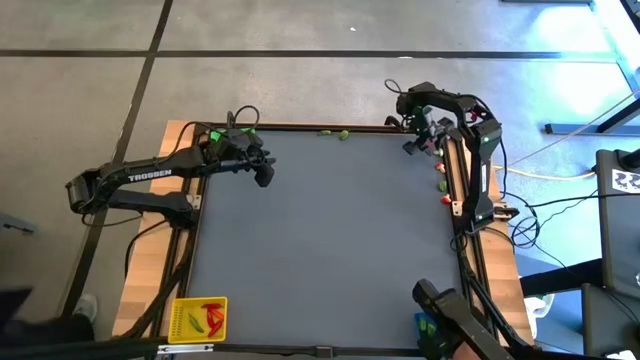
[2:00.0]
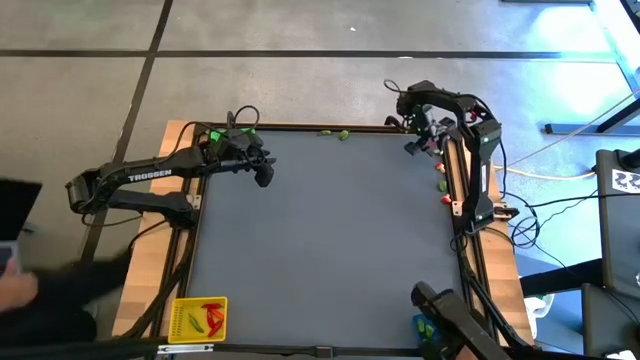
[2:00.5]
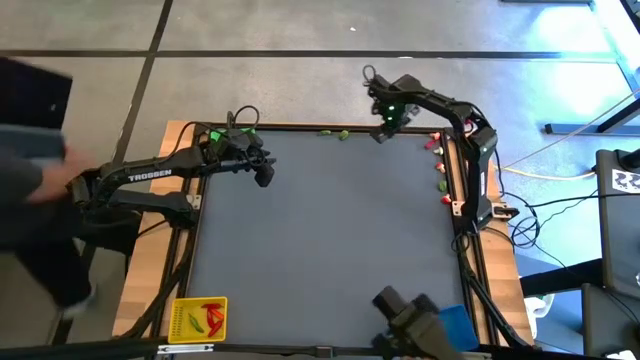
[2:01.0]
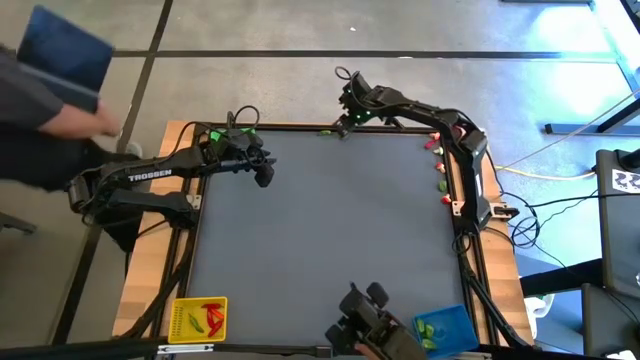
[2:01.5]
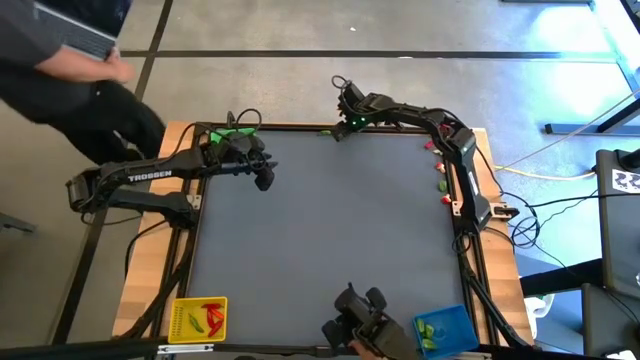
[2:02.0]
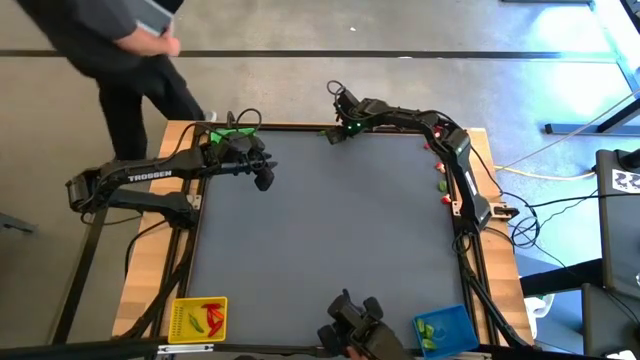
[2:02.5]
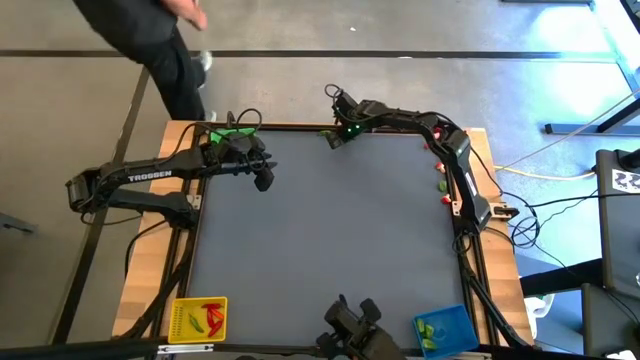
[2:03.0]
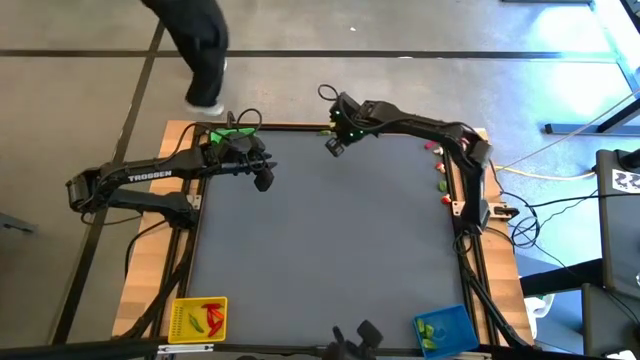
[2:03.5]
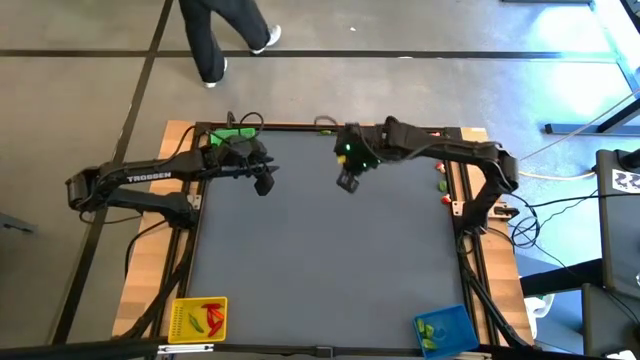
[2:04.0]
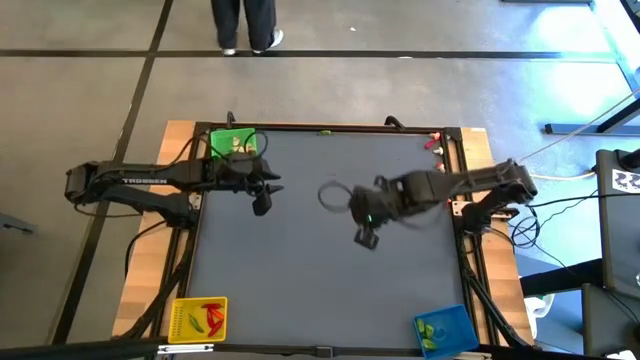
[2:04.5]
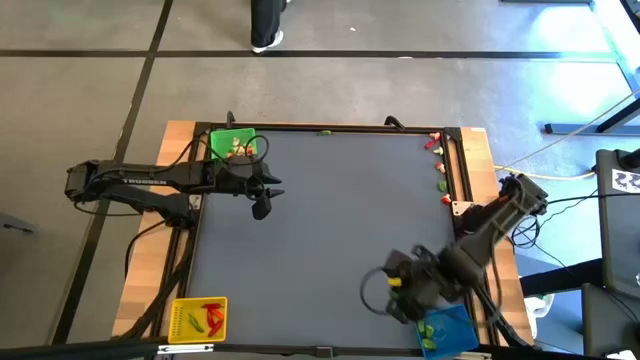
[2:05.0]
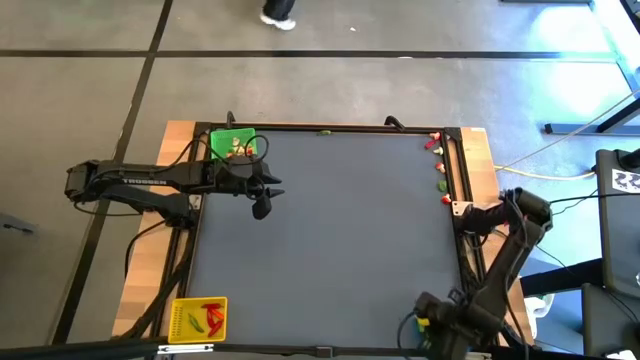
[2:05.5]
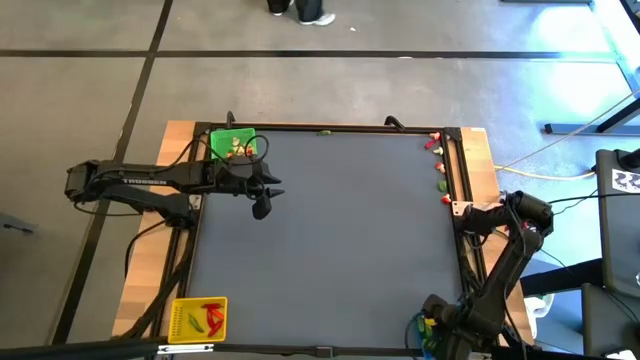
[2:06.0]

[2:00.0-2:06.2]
Task: Sort produce into baskets
Put the green chili pepper into the blue bin

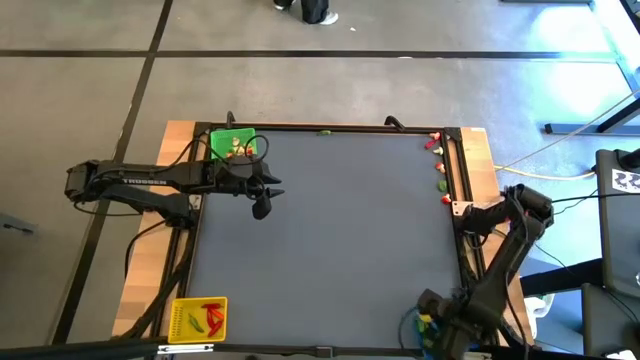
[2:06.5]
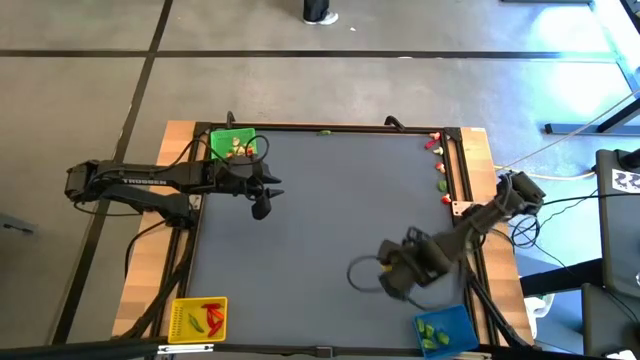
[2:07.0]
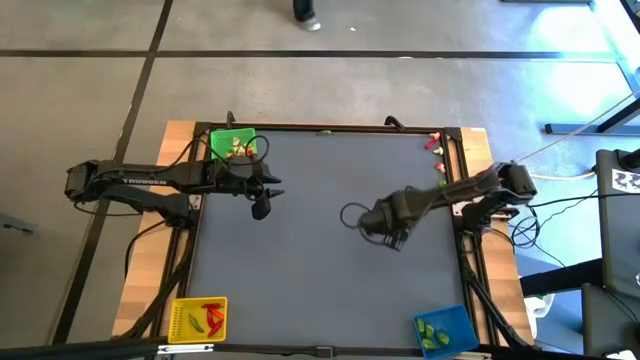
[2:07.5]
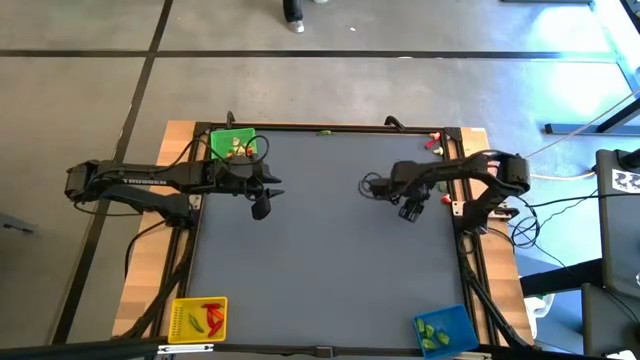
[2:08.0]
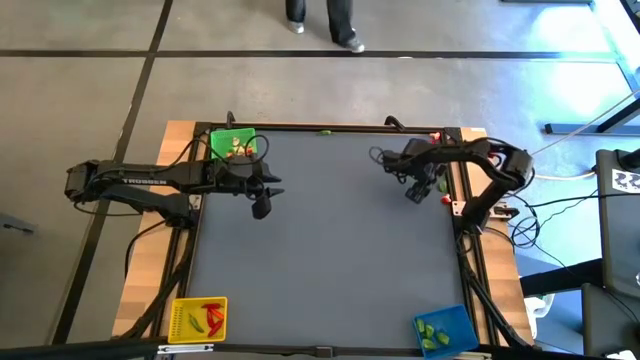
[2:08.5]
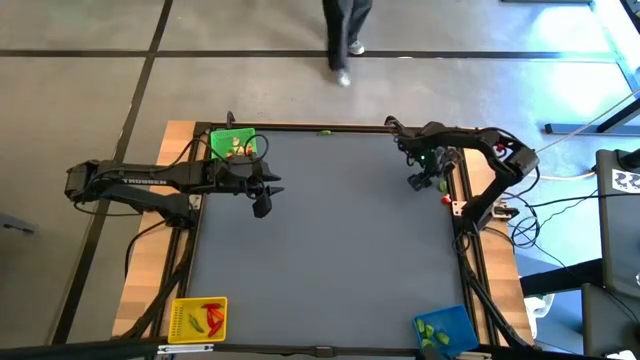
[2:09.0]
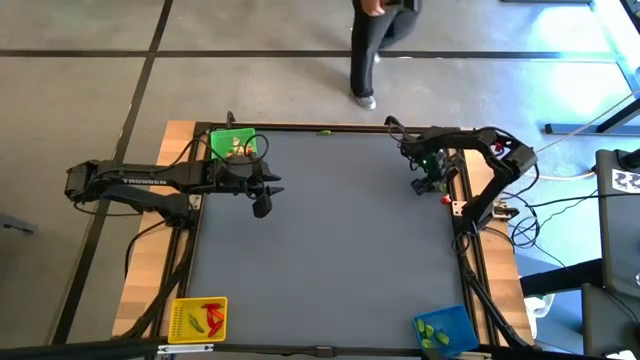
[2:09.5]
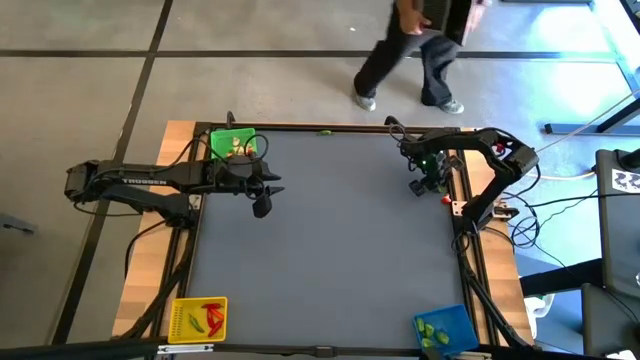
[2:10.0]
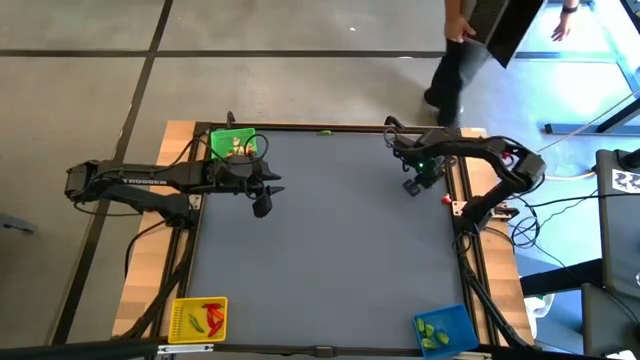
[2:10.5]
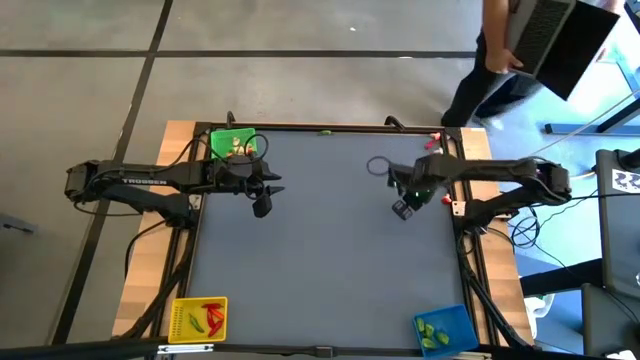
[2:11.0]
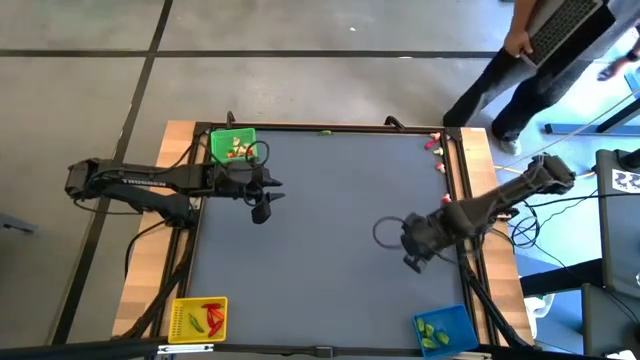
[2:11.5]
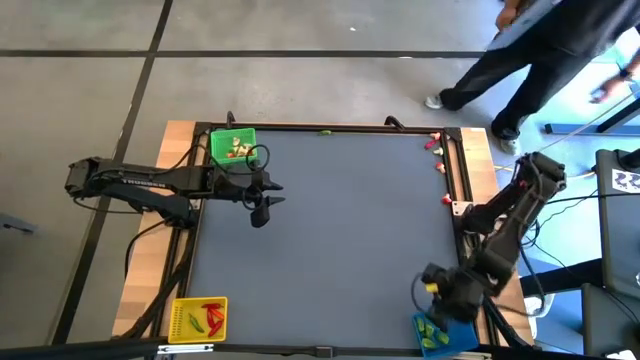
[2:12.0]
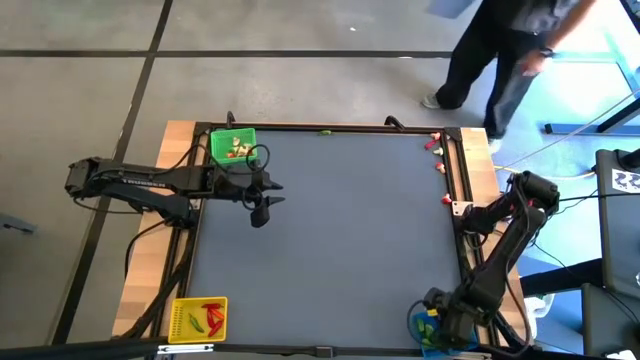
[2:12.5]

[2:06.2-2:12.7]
Put the green chili pepper into the blue bin

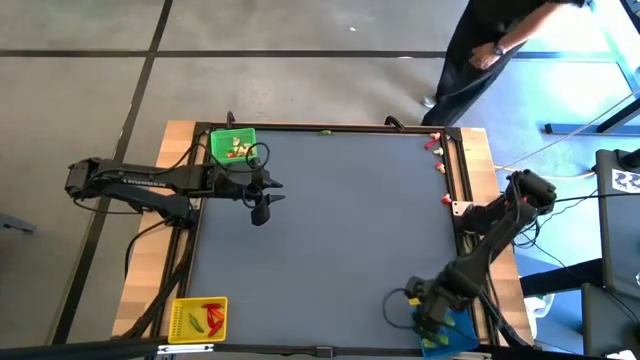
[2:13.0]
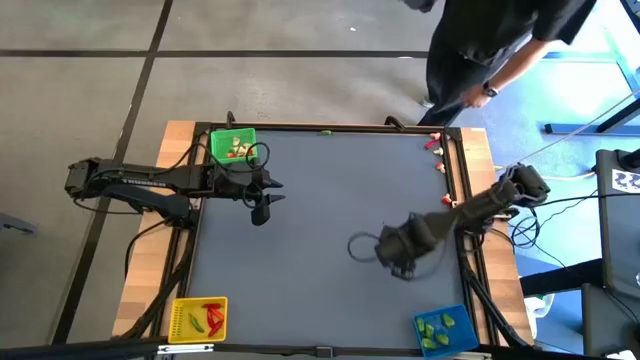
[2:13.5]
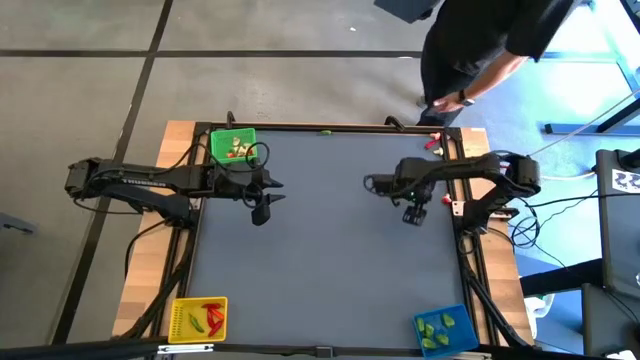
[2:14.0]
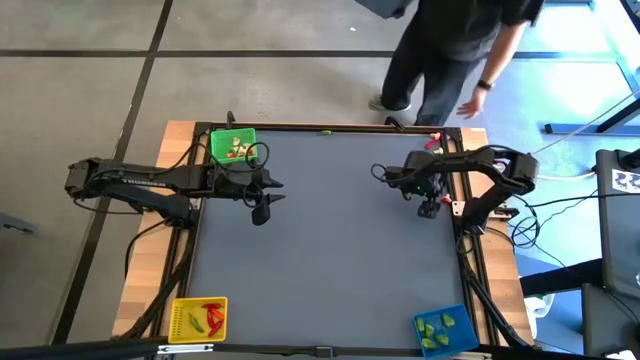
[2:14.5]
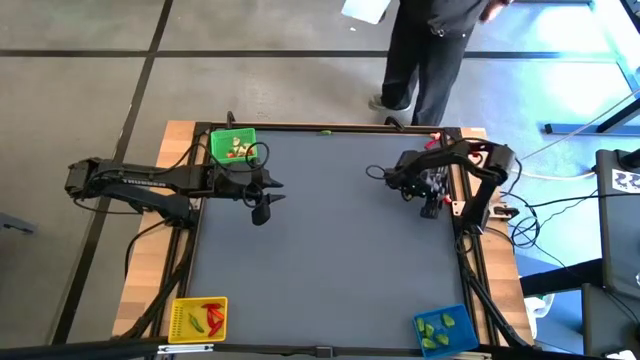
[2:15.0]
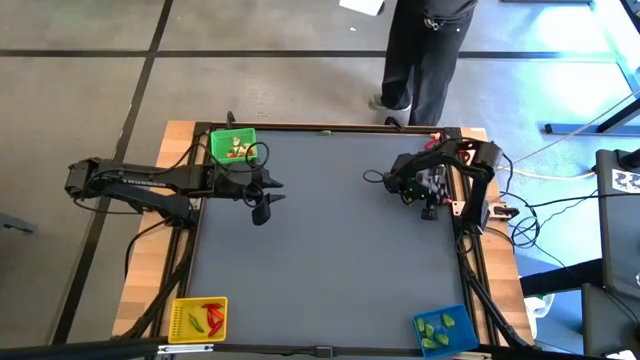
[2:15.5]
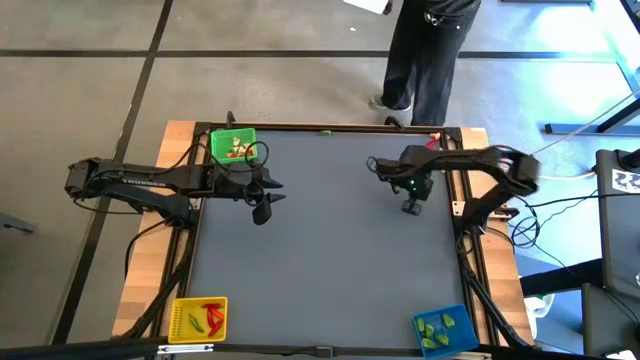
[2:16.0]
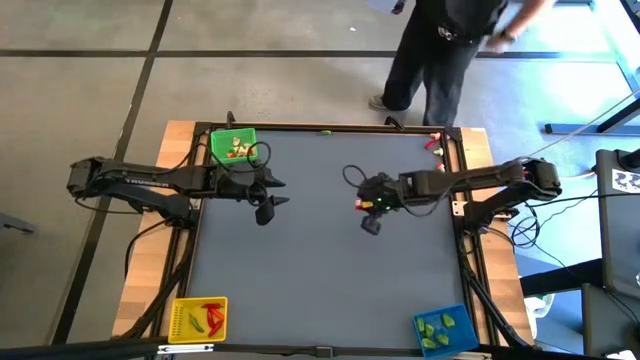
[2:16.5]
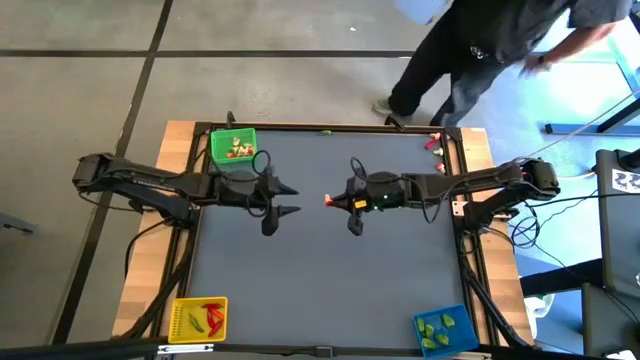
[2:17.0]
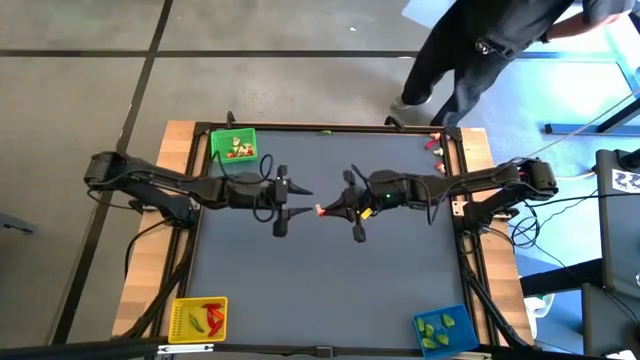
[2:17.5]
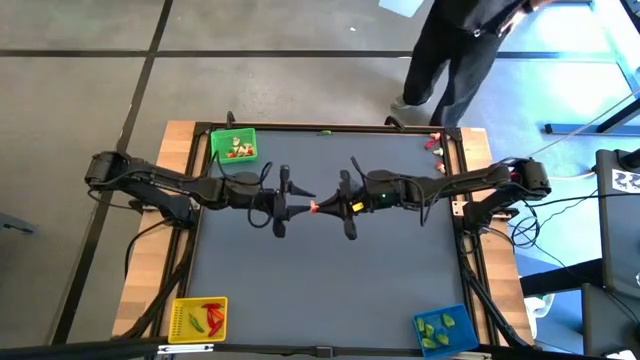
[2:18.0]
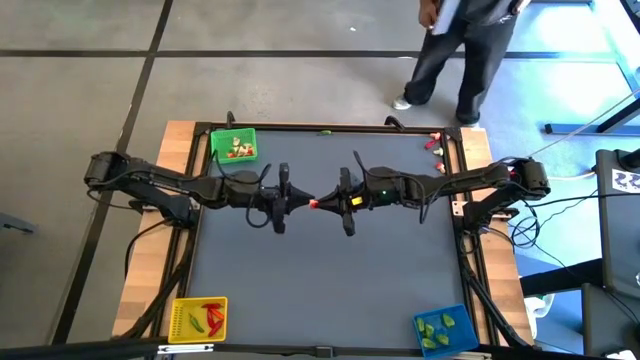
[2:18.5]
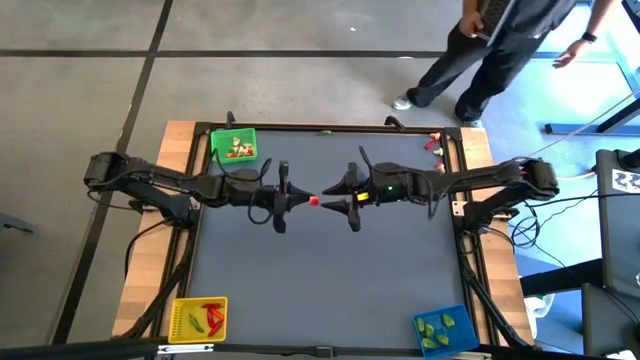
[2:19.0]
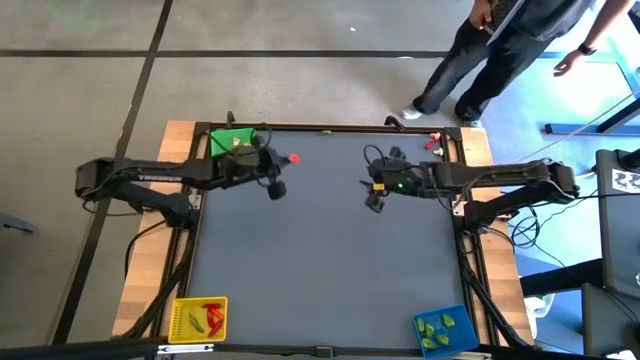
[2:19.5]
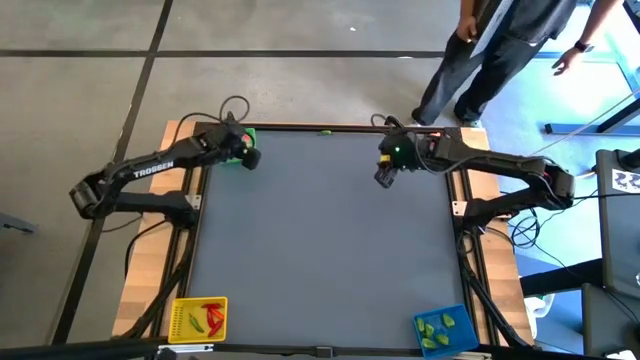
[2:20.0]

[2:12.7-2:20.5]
Put the red mushroom into the green bin
